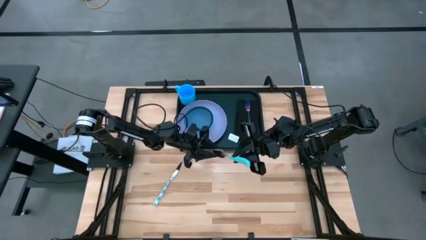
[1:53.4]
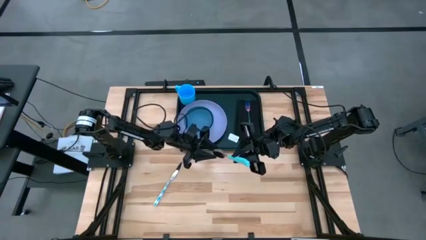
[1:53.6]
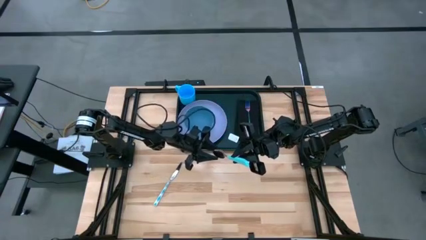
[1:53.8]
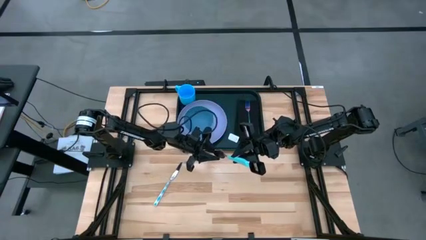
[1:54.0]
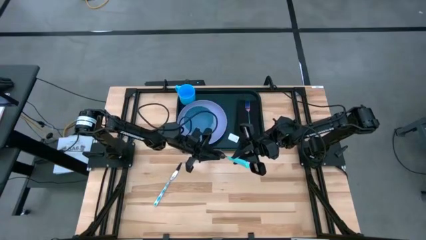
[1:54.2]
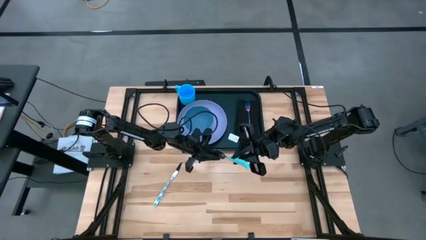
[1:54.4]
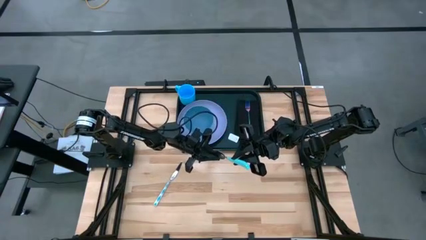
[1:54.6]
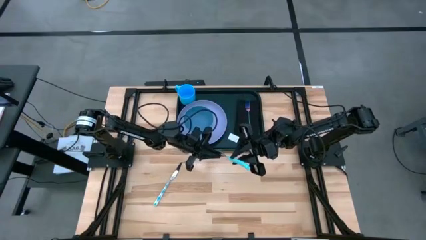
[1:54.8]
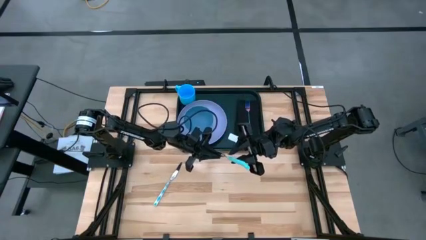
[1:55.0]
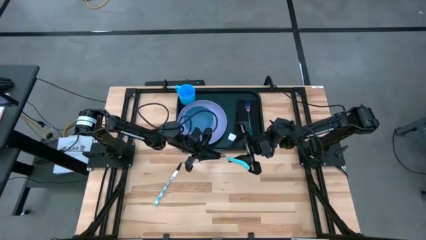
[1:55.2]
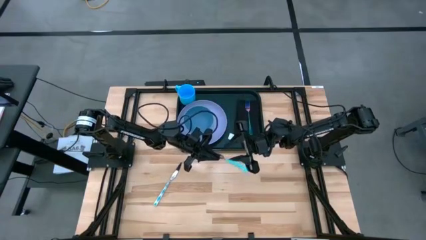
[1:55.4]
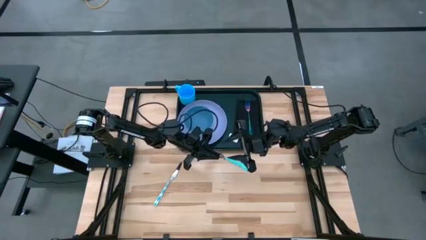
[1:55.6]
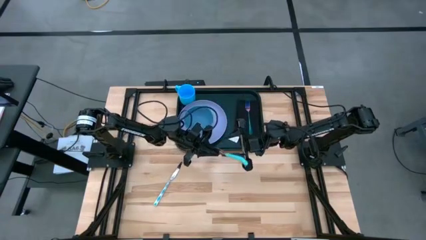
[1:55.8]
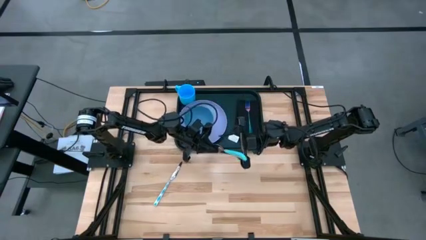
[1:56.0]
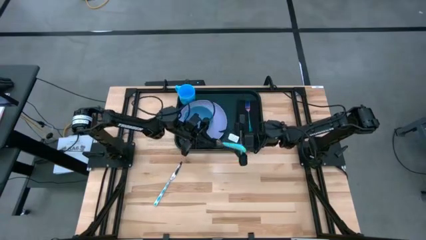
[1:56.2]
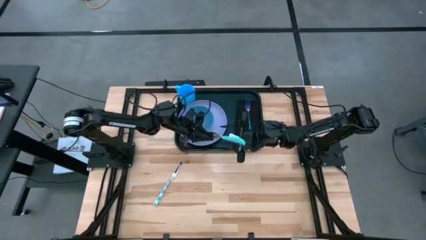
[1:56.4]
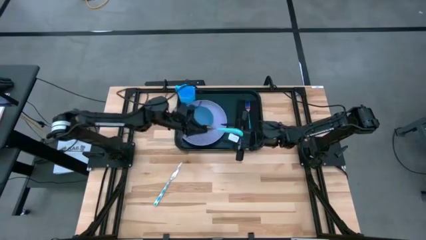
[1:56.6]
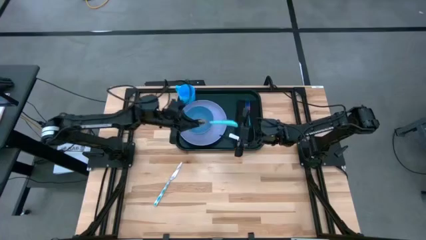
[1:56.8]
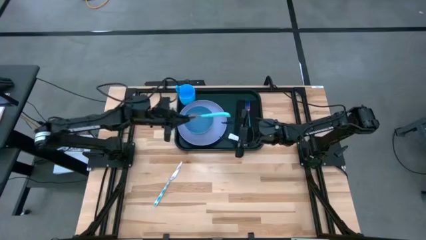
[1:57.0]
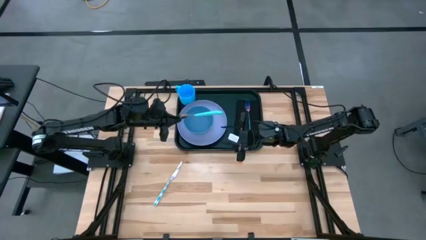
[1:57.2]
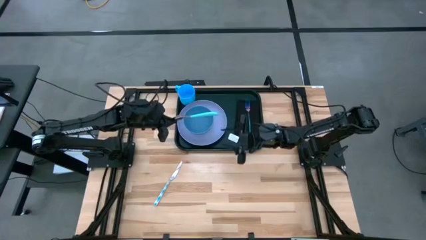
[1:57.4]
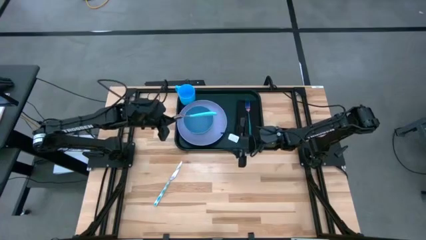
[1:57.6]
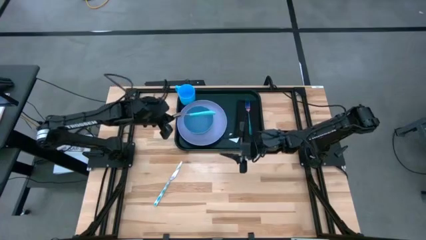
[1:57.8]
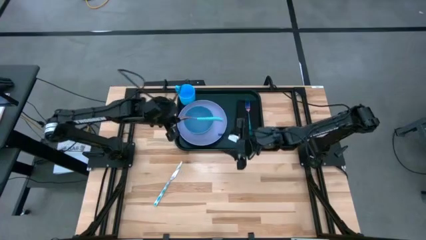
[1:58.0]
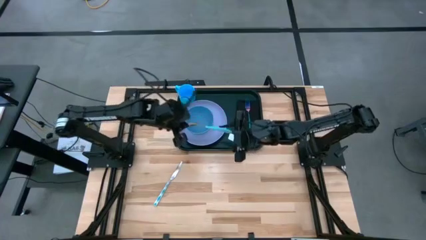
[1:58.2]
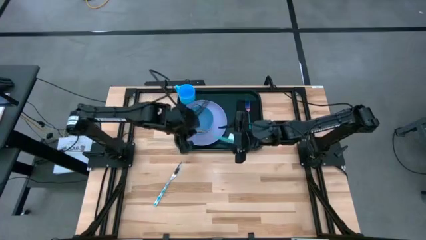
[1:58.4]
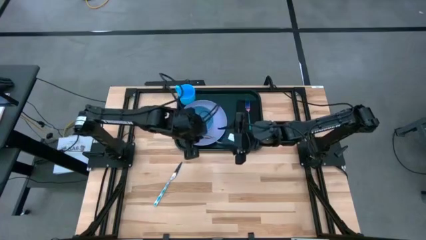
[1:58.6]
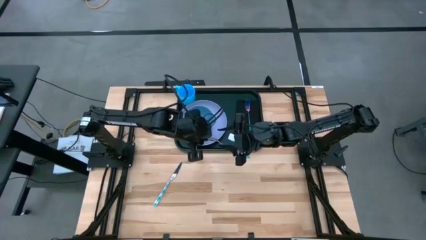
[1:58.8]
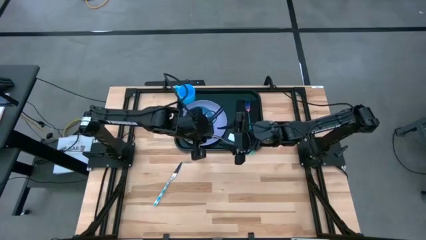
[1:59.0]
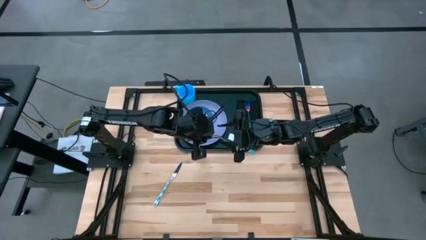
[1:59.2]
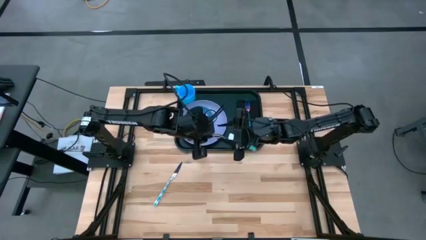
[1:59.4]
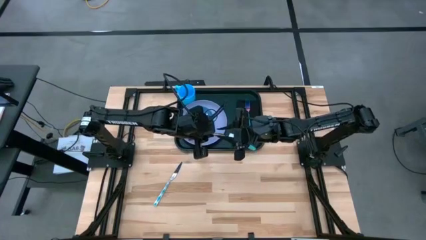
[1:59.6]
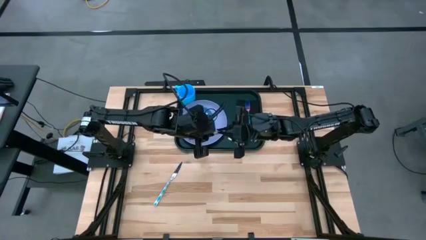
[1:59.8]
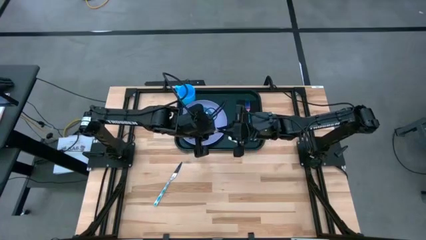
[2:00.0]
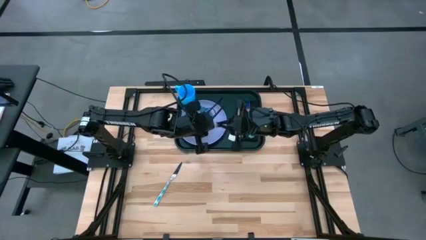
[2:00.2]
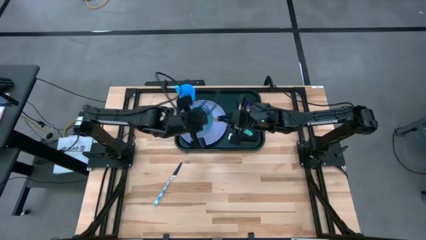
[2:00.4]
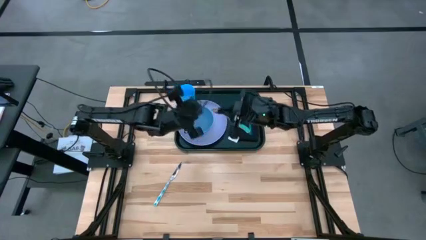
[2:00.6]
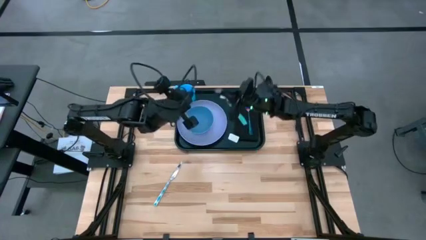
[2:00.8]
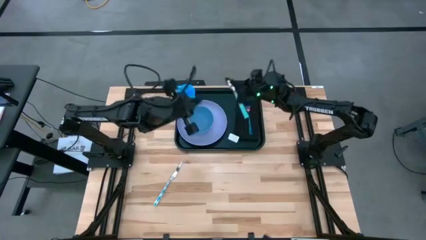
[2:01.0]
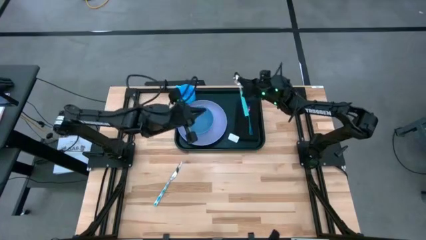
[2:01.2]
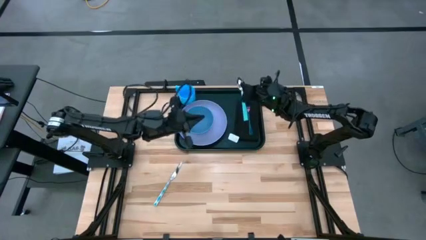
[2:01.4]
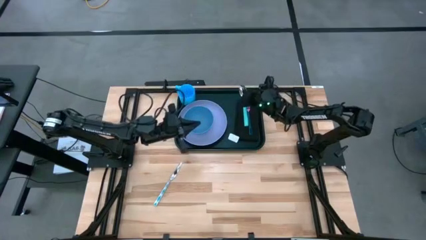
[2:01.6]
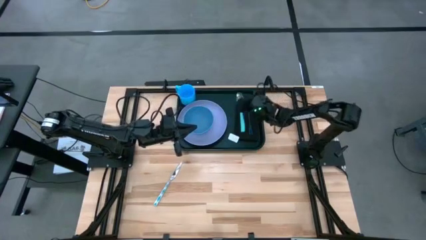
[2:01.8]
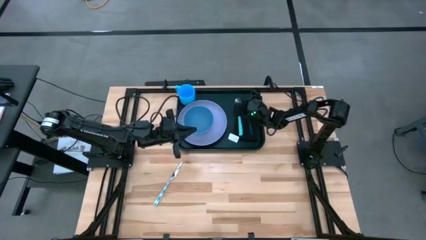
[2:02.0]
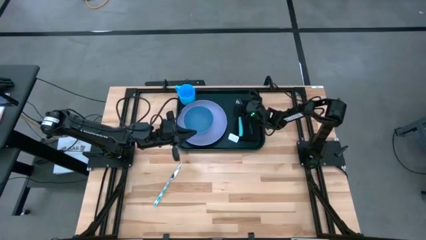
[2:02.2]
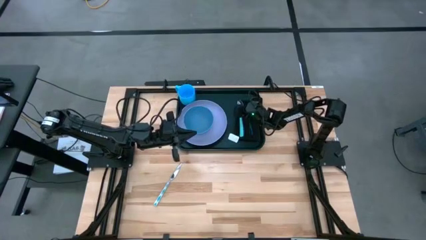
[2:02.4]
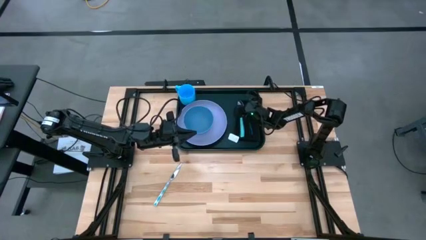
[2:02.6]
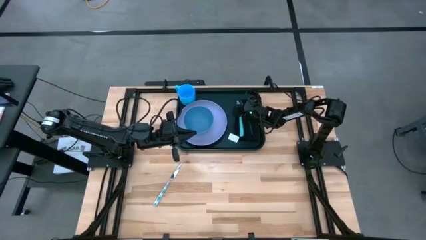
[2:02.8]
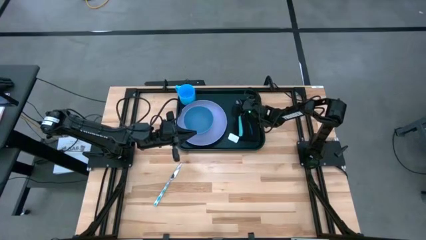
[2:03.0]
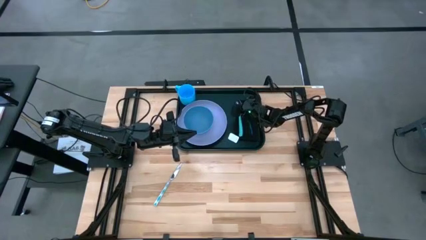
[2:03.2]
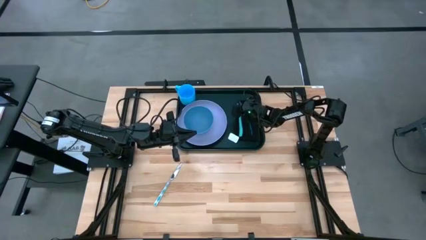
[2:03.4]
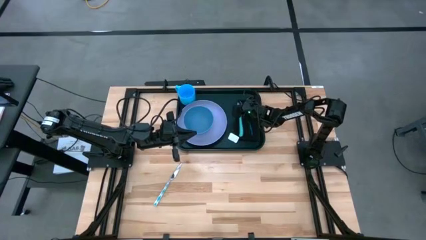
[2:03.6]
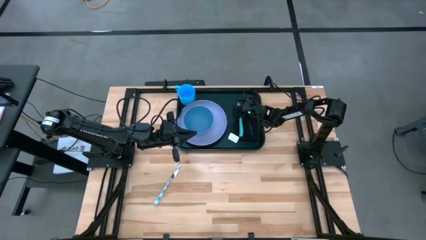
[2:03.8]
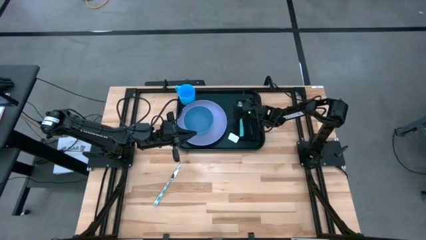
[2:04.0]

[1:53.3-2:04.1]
Task: Set up tray
Put the blue spoon on top of the black napkin to the left of the blue fork on the black tray

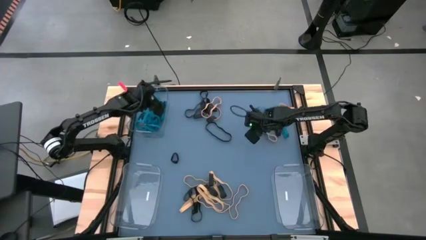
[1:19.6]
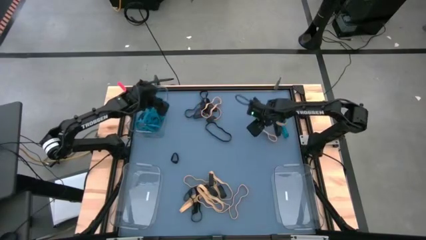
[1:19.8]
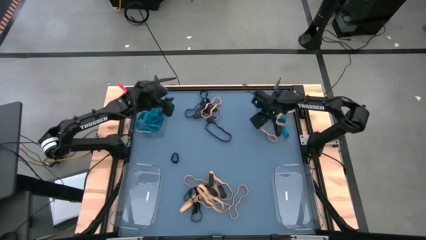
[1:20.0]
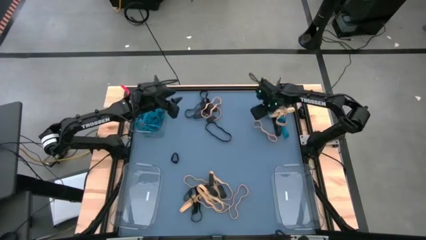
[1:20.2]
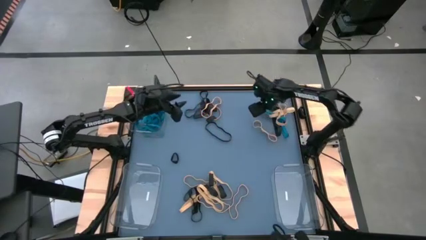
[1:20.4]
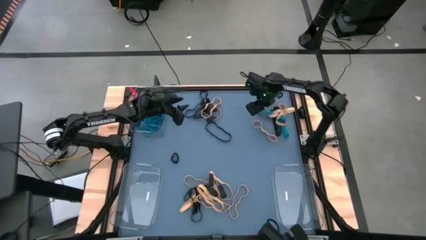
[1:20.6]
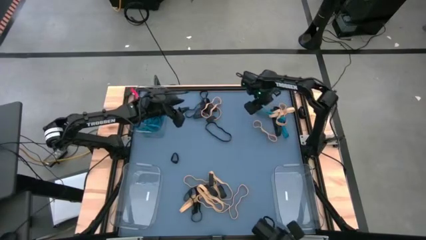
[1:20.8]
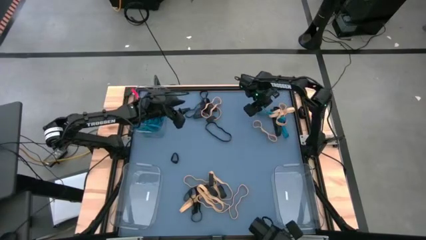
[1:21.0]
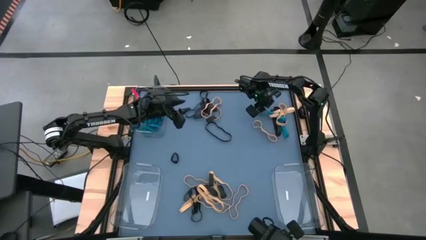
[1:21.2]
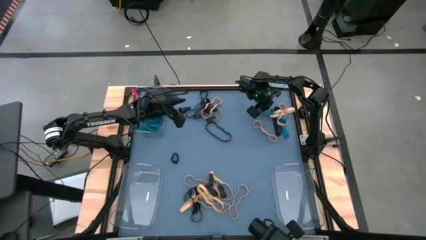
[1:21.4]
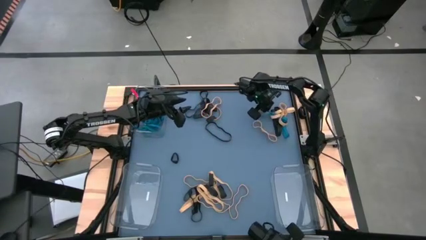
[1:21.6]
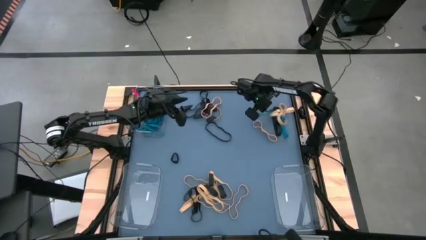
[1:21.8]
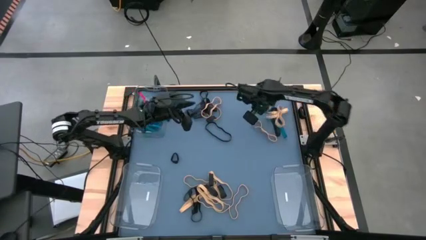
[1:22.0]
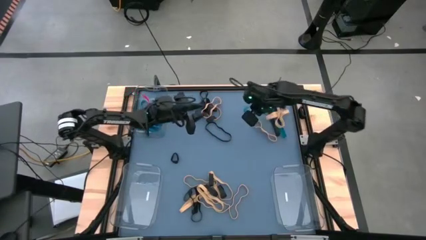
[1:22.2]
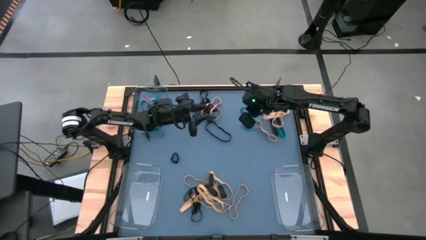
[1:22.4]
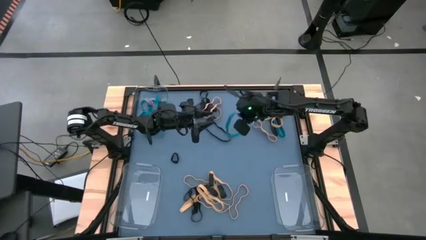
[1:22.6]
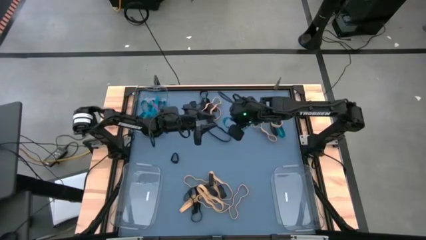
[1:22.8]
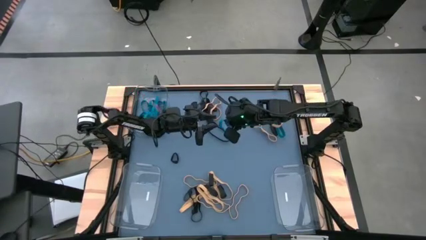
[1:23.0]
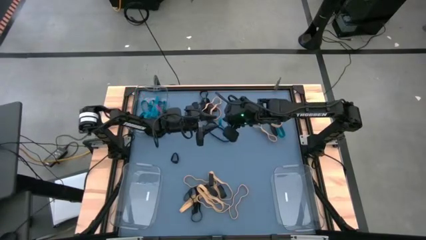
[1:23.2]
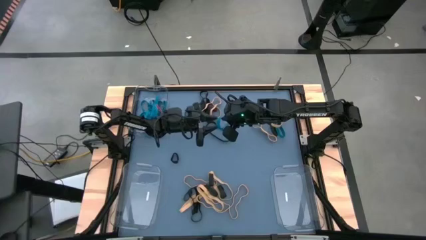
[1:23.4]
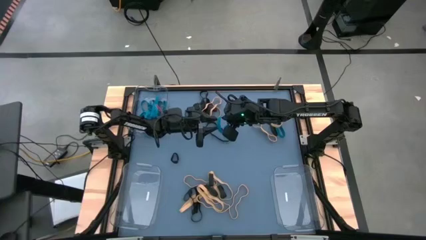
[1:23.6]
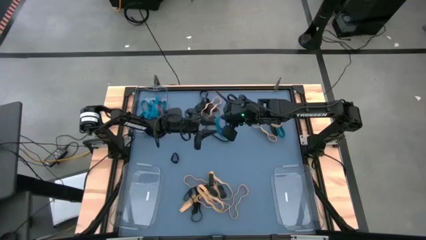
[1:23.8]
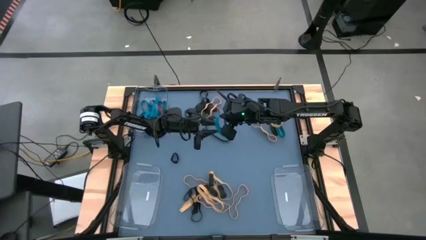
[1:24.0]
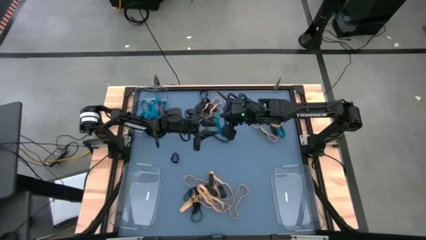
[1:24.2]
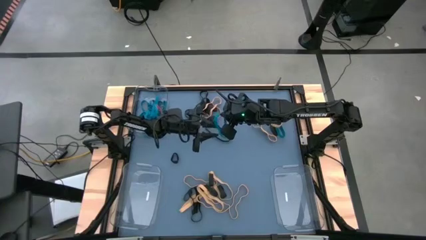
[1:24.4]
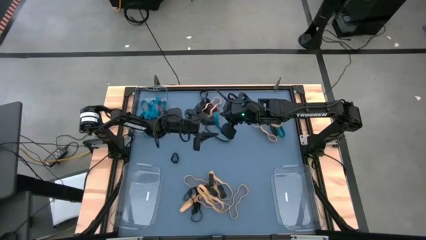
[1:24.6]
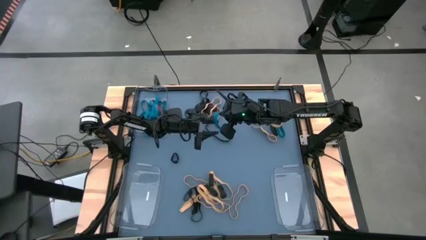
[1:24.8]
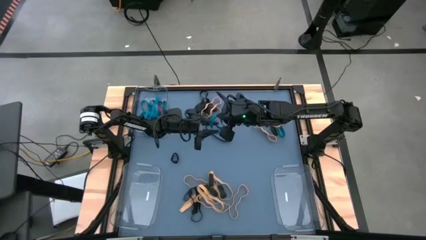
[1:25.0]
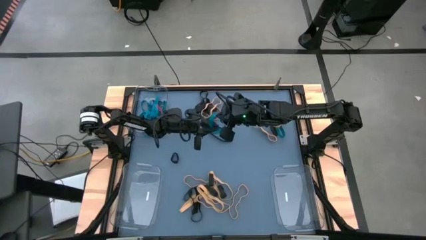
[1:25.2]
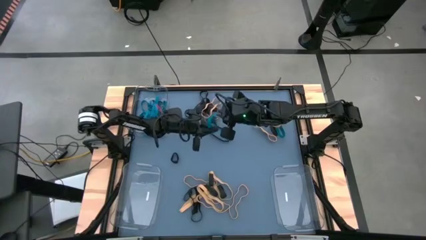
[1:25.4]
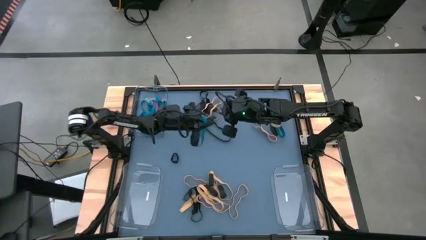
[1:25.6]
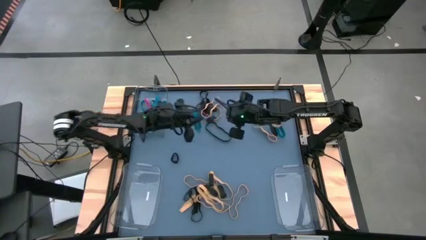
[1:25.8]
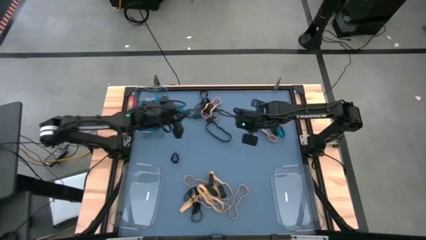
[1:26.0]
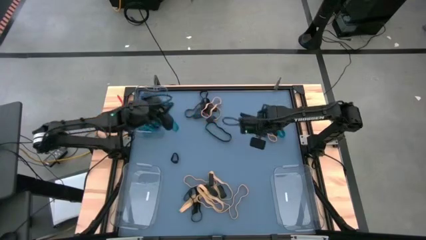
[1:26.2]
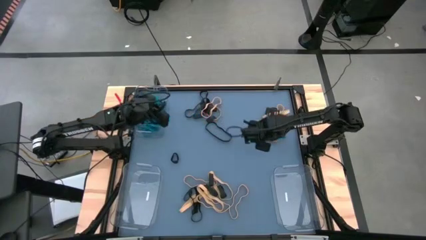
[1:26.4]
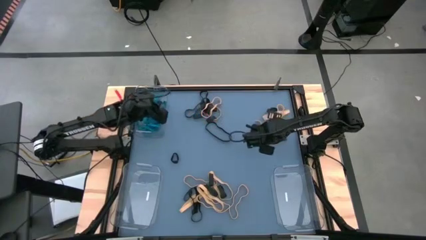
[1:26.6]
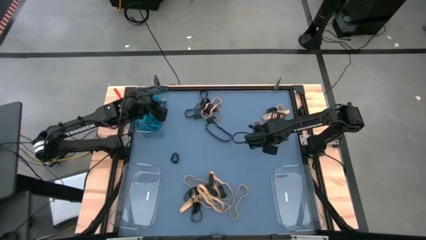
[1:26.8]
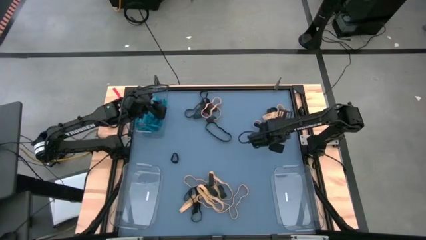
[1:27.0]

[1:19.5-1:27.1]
Task: Sort rubber bands into baskets
Put the blue rubber band into the top transparent bin
